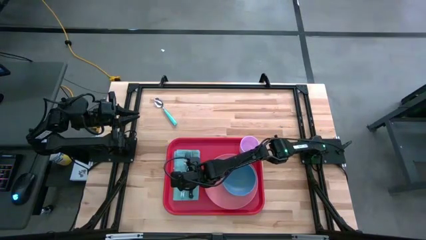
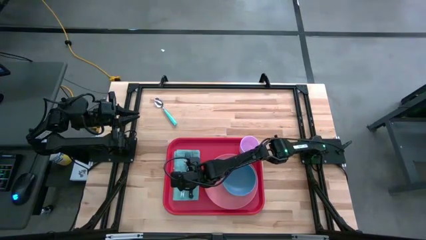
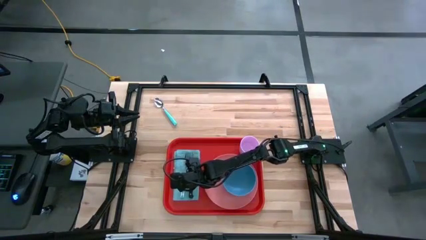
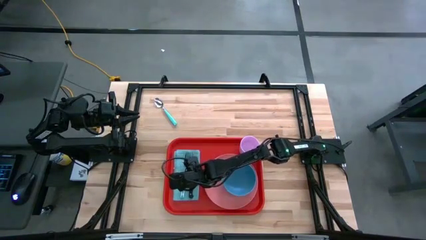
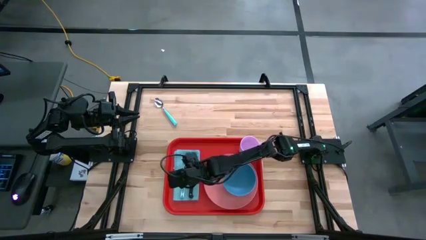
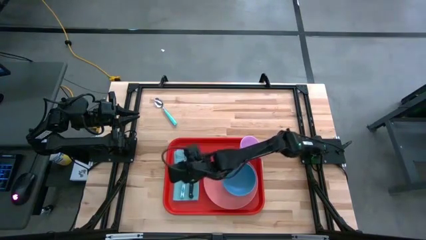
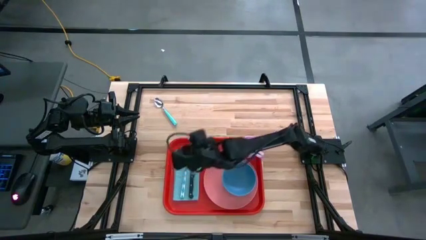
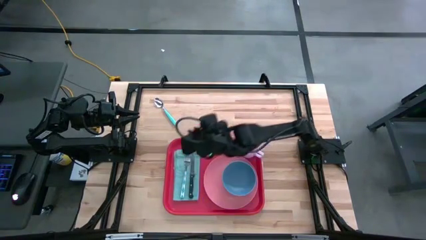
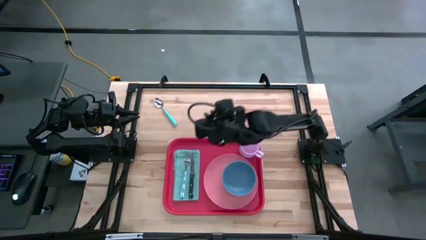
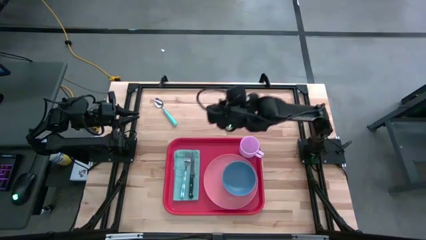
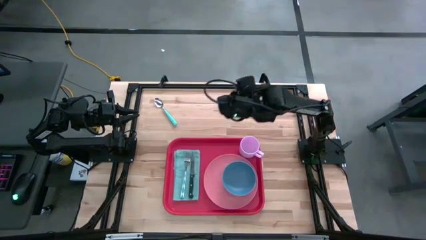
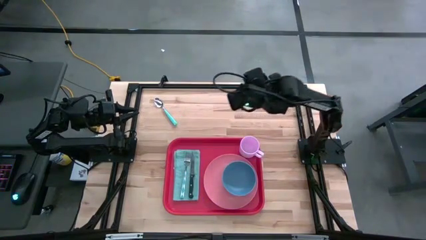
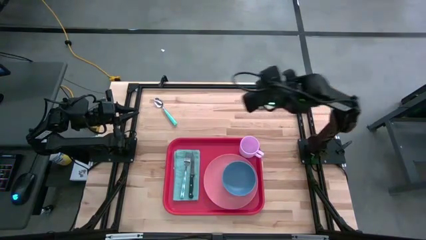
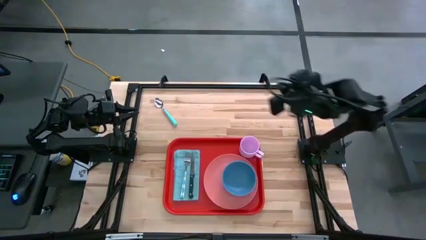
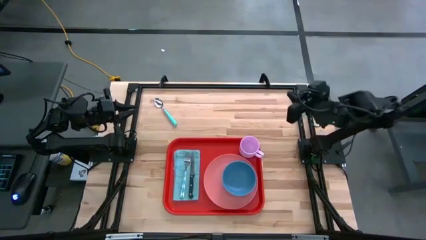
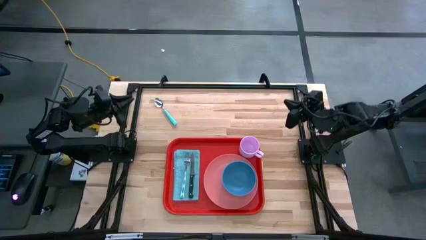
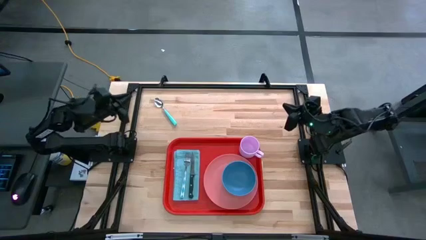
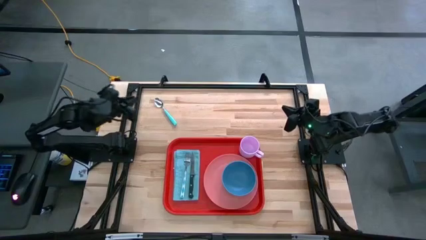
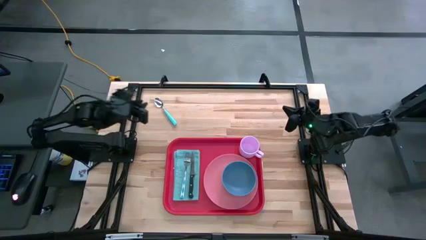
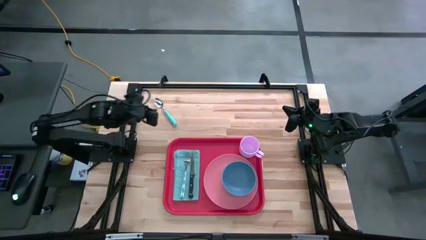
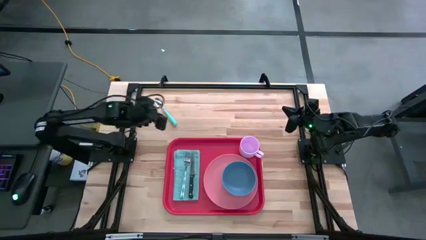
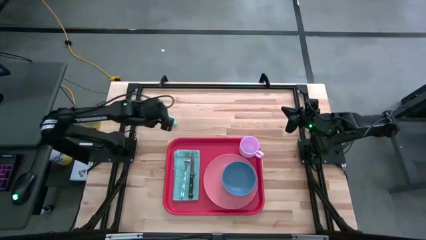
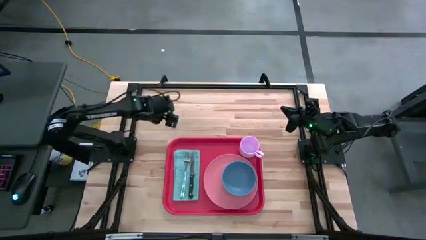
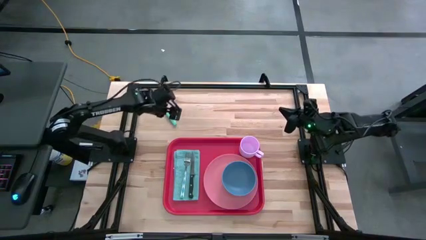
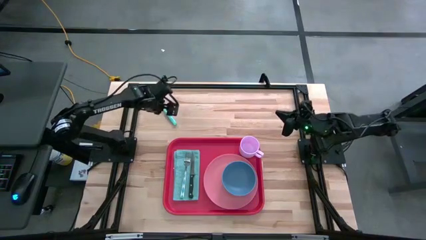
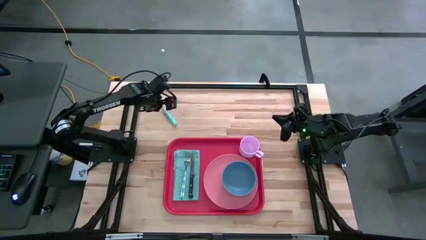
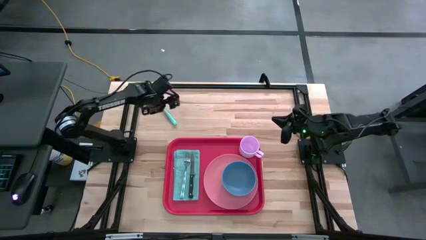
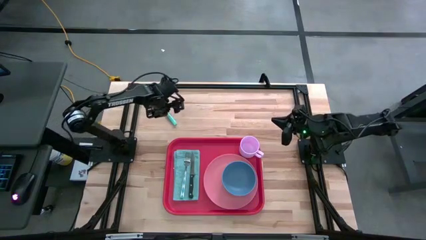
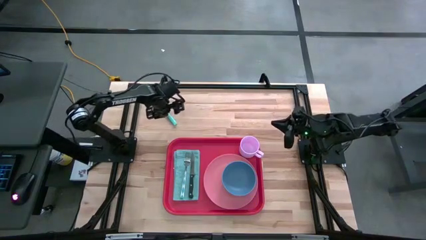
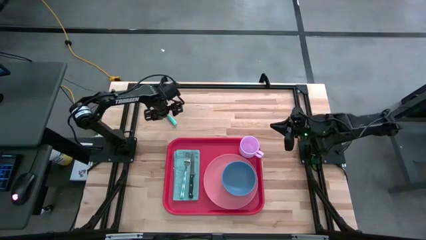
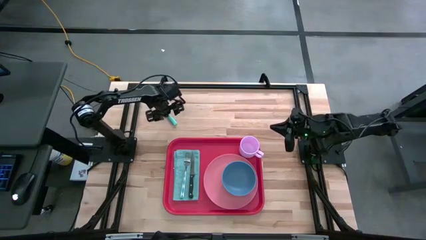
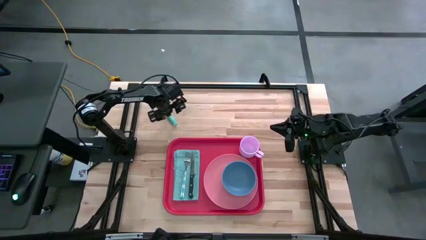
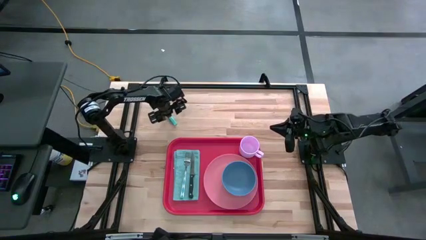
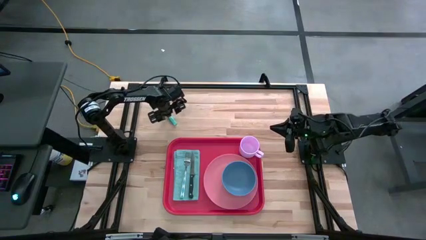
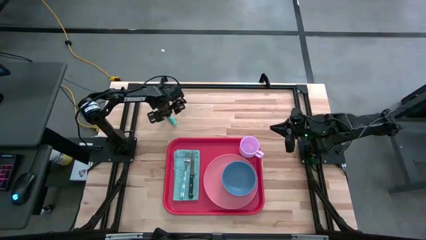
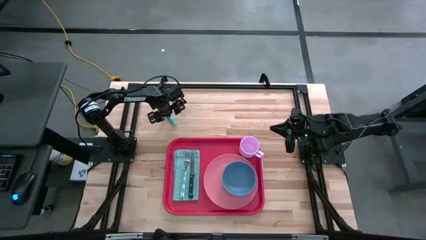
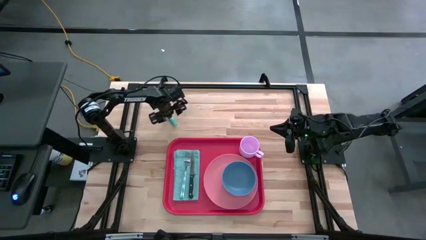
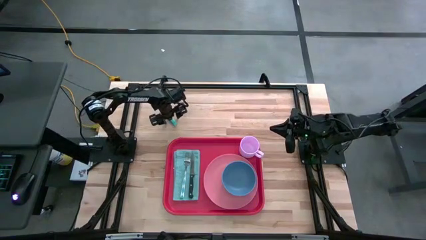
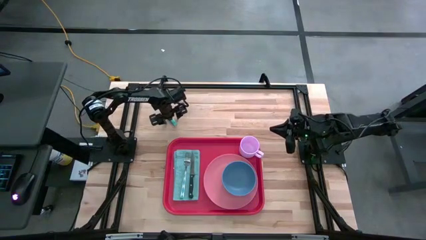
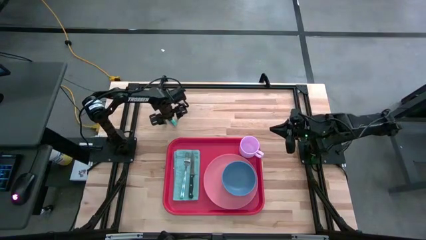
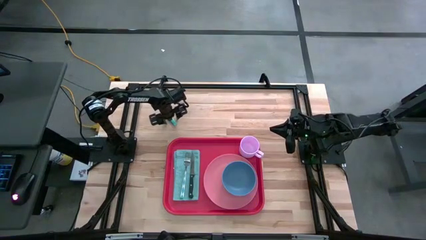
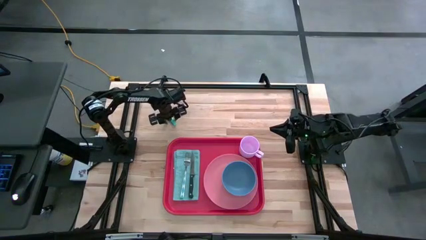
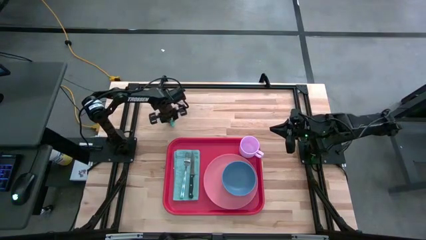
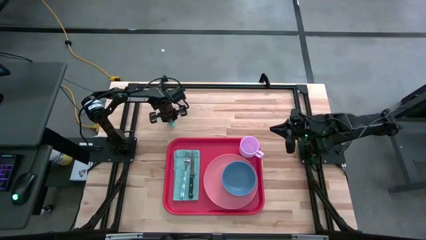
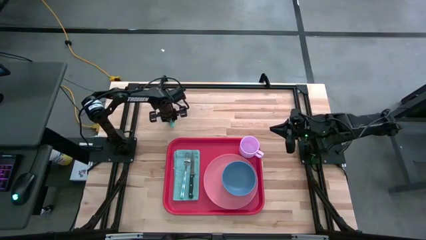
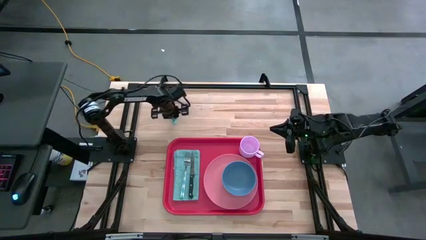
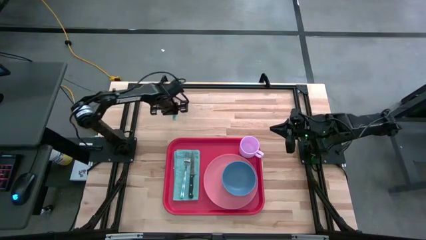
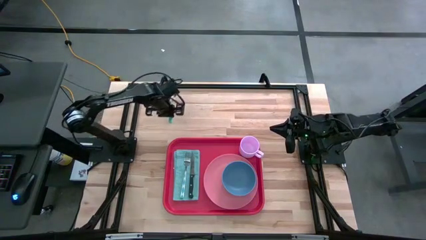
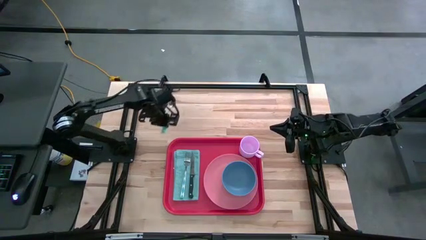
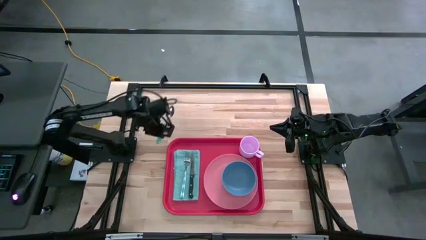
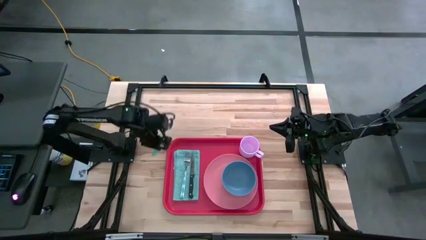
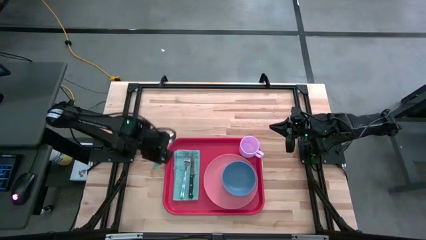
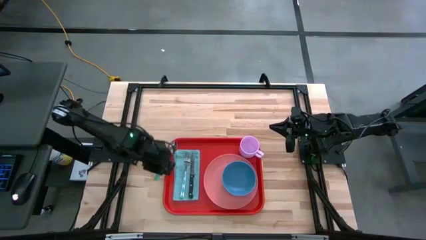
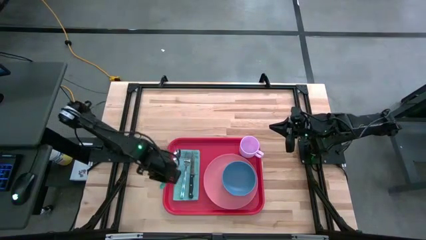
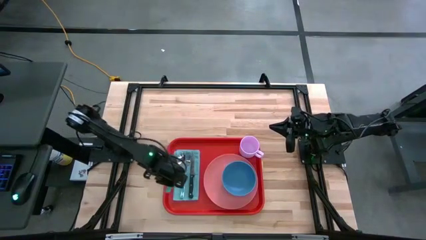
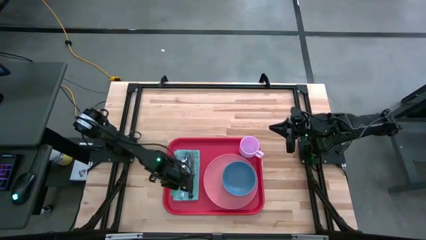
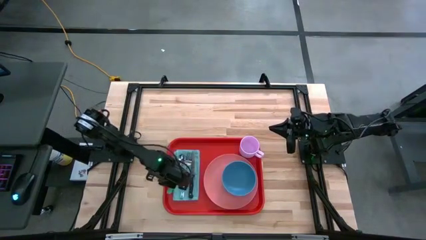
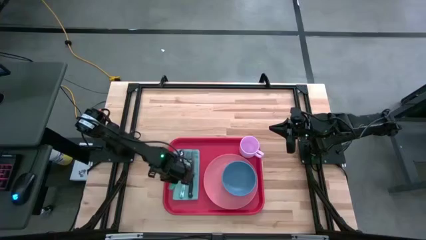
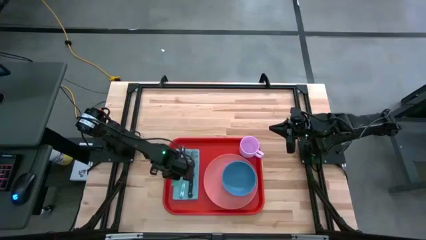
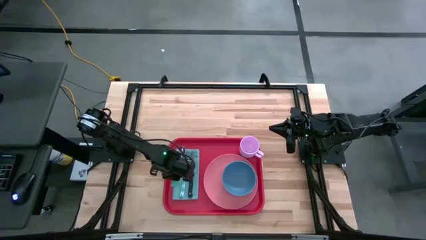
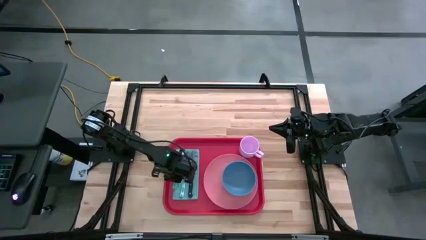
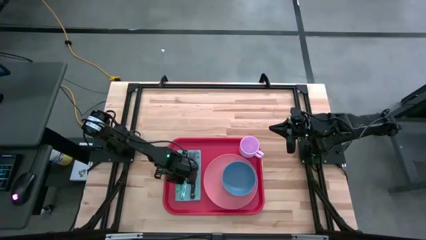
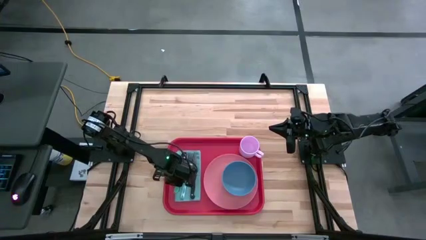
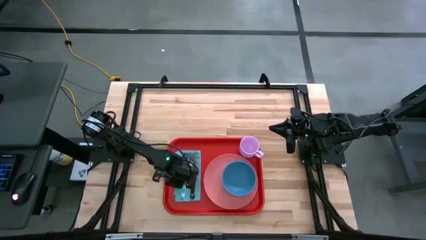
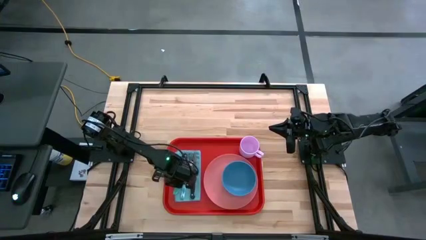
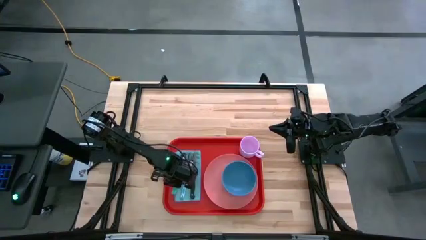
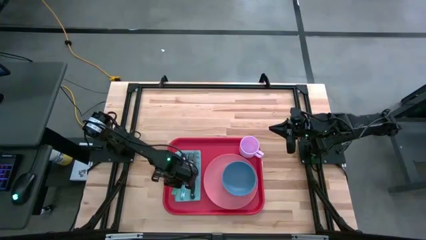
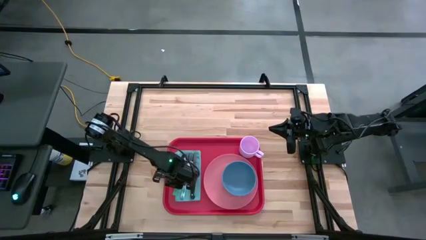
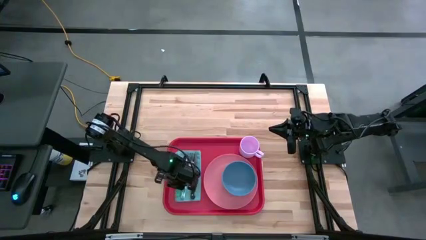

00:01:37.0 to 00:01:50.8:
Task: Set up tray
Put the blue spoon on the blue napkin to the left of the blue fork
